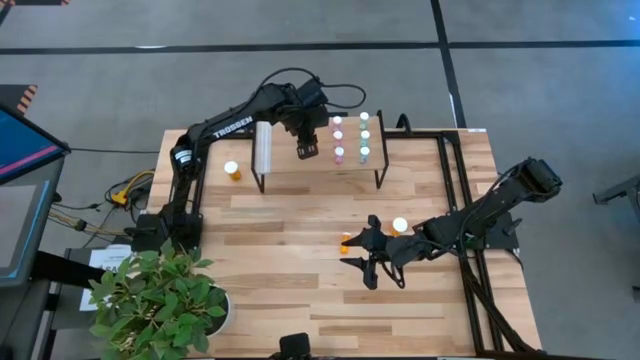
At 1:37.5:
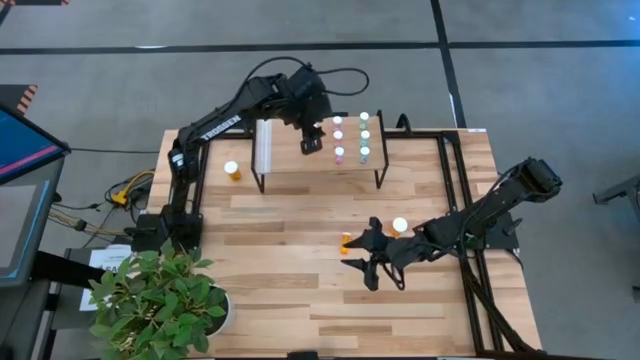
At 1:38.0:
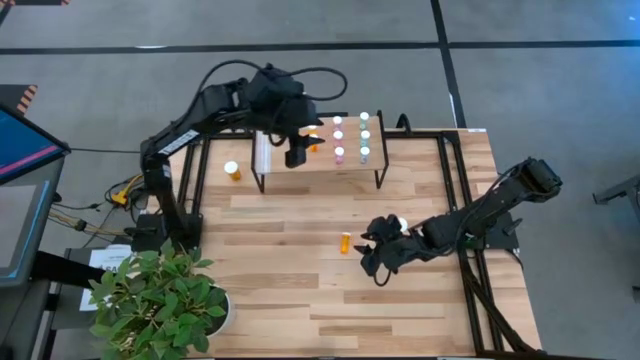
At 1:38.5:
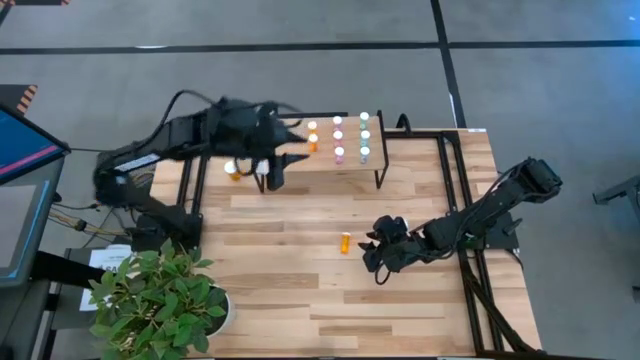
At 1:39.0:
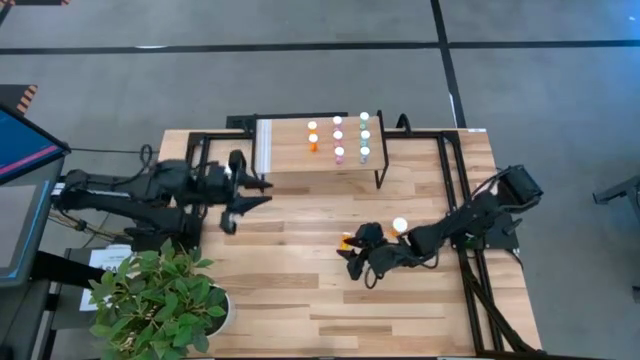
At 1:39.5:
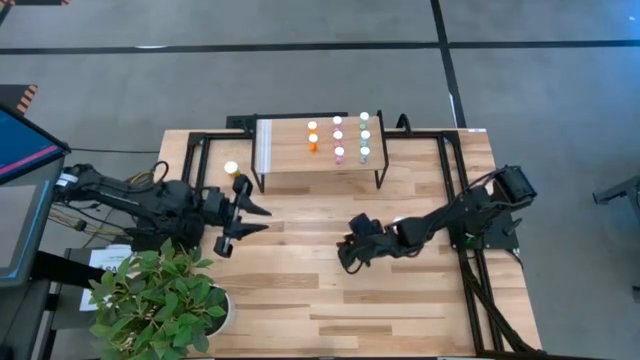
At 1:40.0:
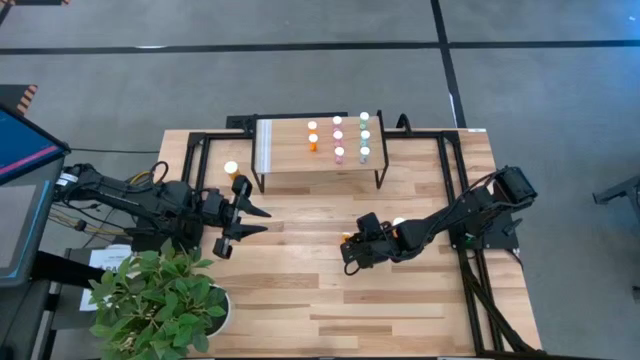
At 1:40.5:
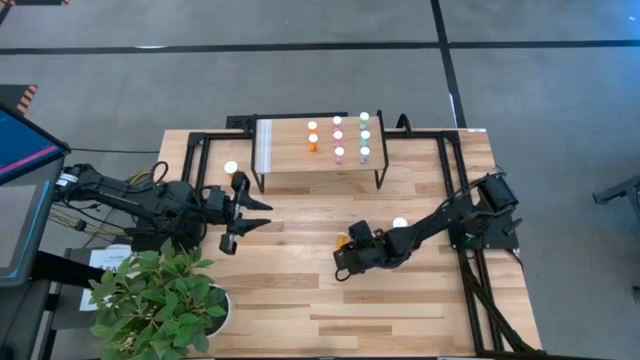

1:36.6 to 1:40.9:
Task: Pick and place medicine bottles onto shelf by color
Align the small orange pill bottle with the other small orange pill bottles on the shelf

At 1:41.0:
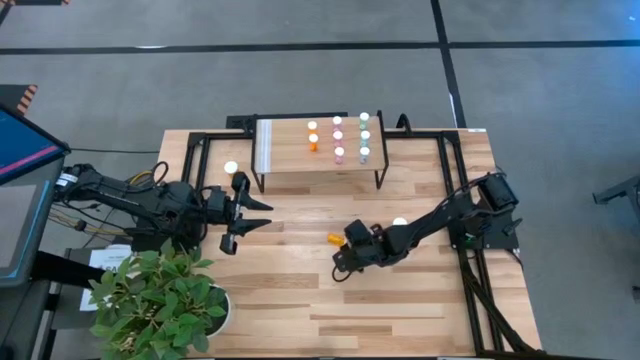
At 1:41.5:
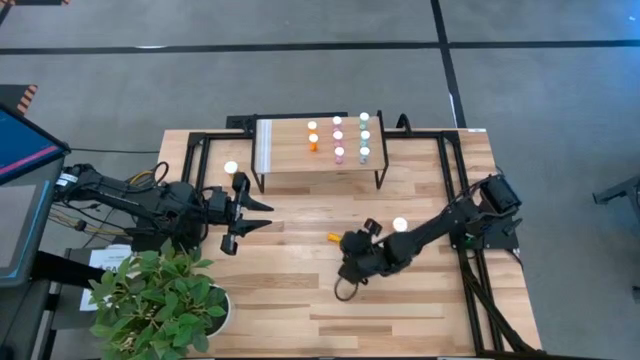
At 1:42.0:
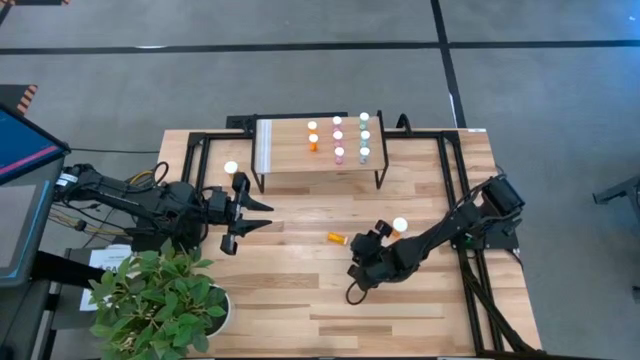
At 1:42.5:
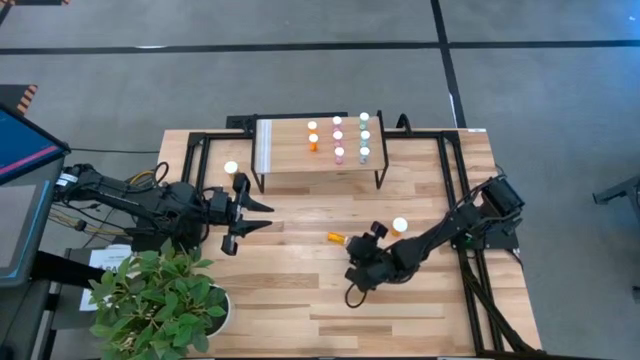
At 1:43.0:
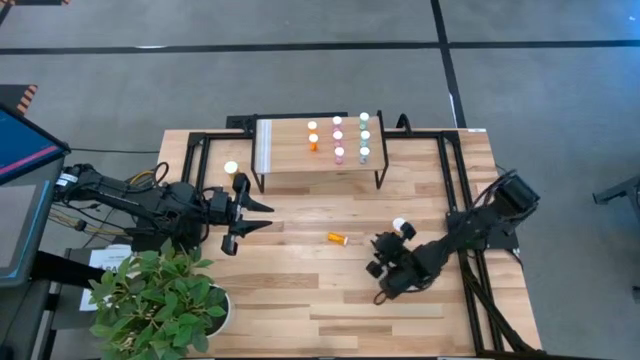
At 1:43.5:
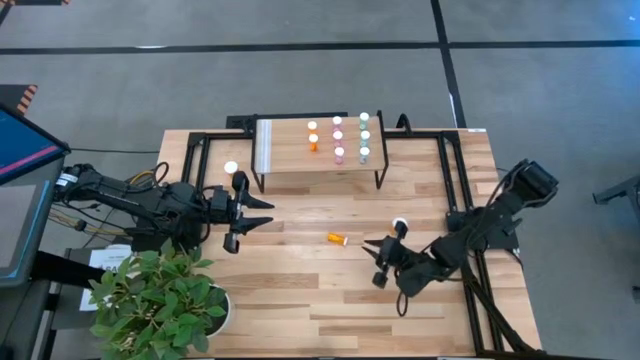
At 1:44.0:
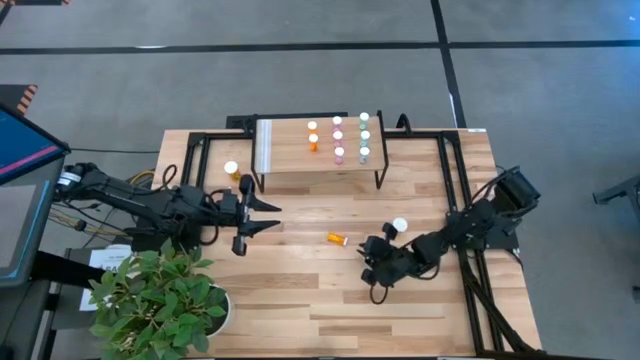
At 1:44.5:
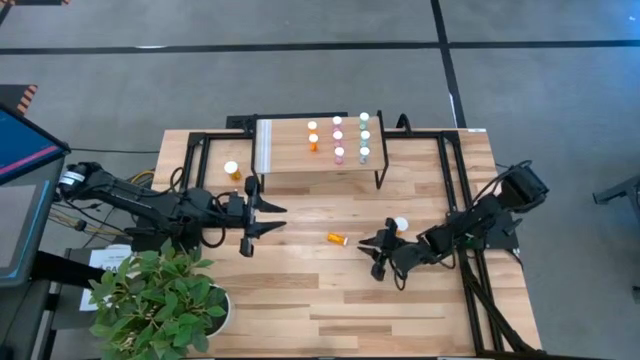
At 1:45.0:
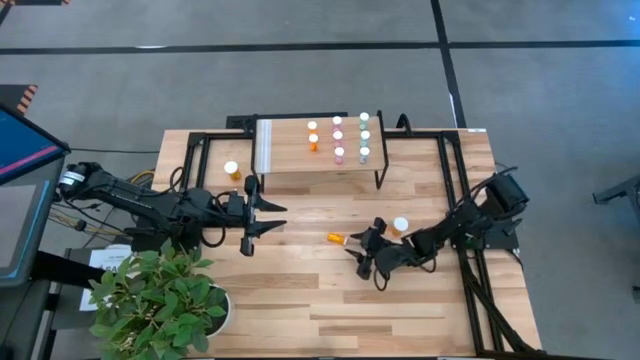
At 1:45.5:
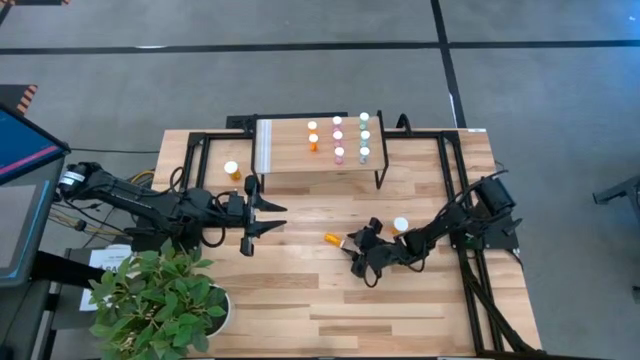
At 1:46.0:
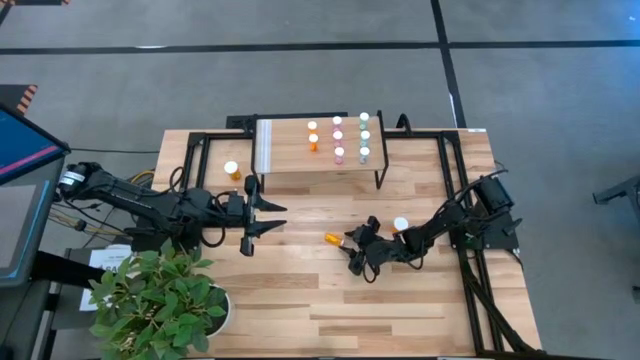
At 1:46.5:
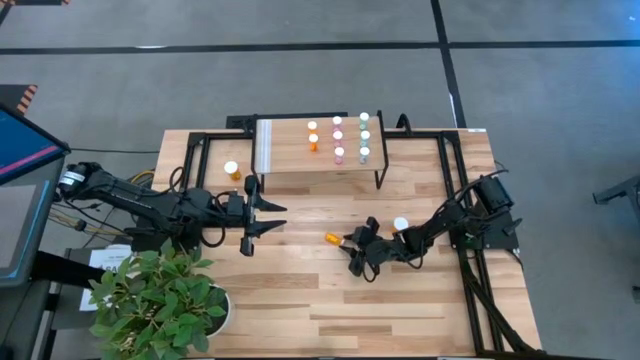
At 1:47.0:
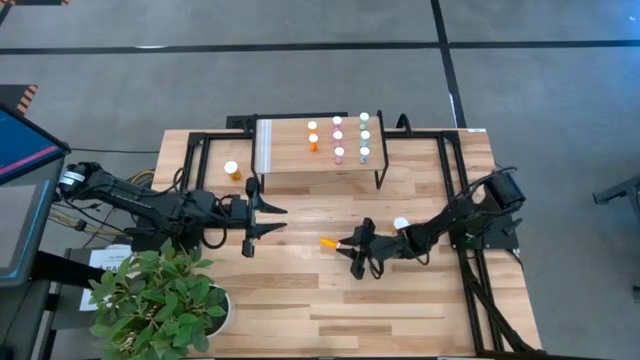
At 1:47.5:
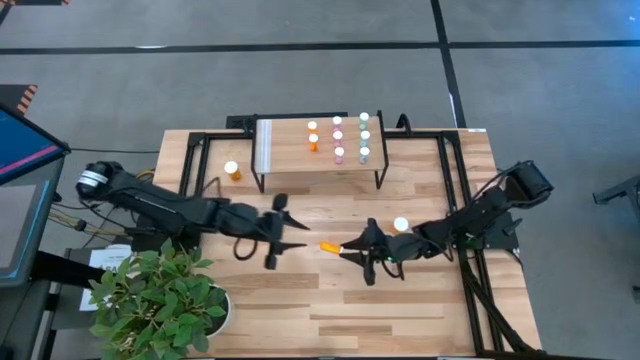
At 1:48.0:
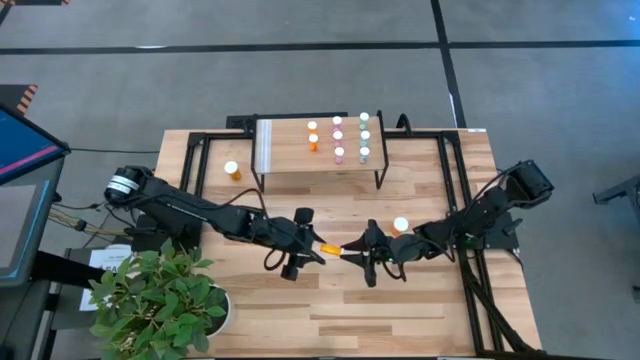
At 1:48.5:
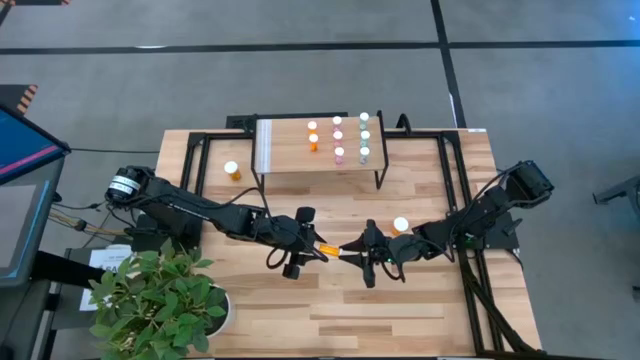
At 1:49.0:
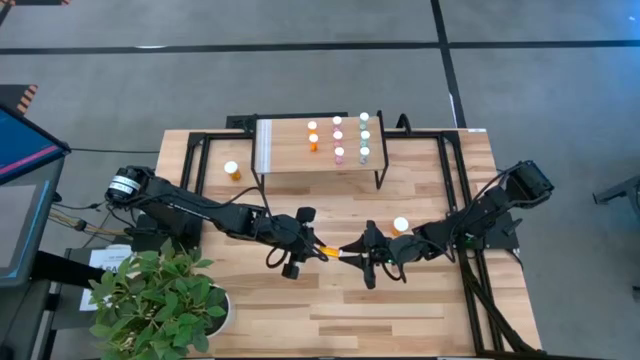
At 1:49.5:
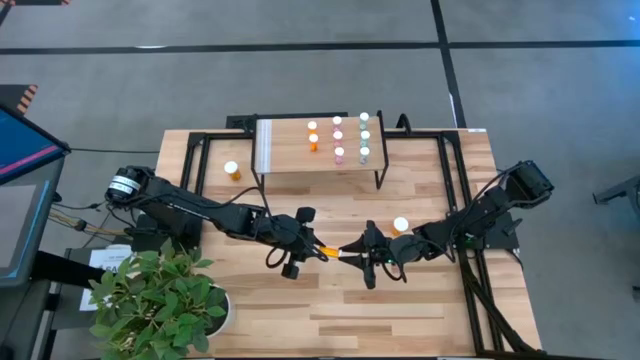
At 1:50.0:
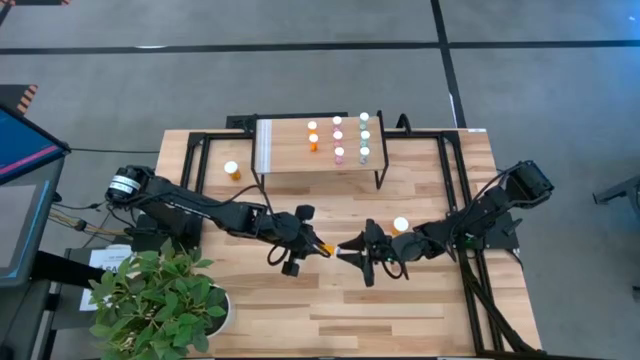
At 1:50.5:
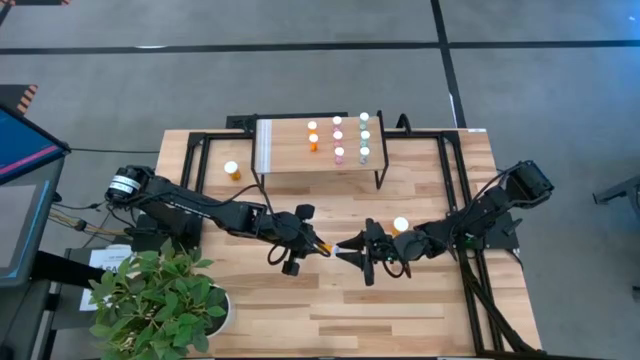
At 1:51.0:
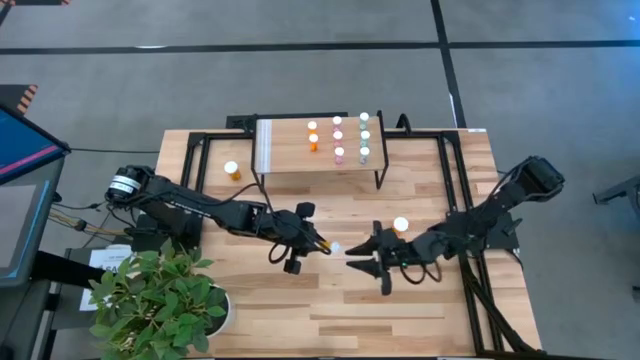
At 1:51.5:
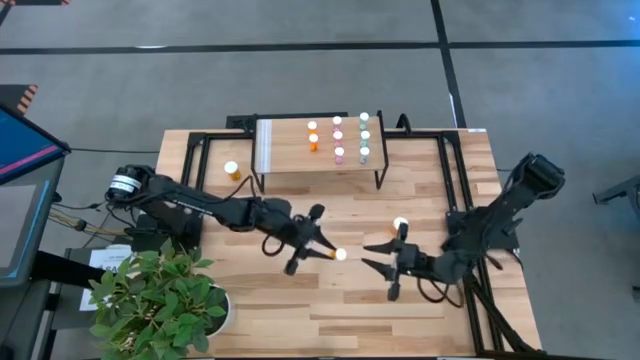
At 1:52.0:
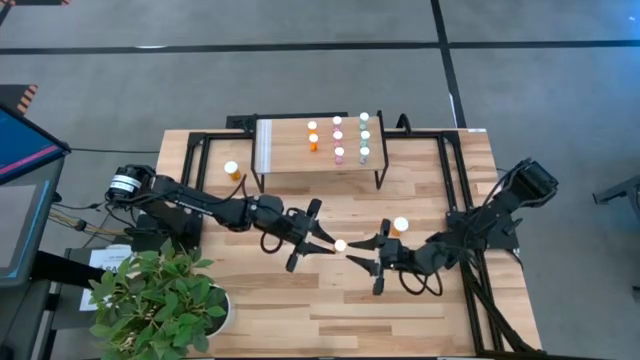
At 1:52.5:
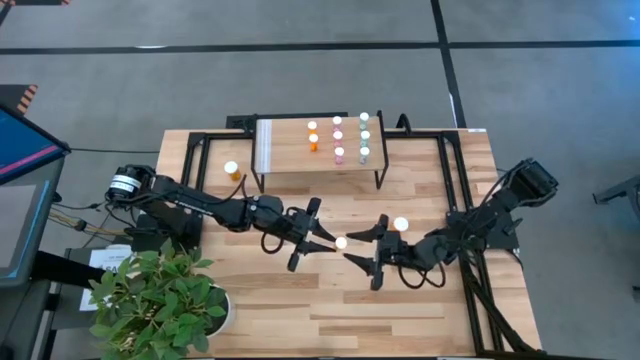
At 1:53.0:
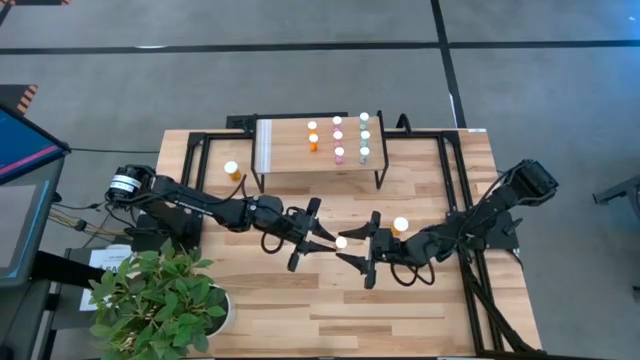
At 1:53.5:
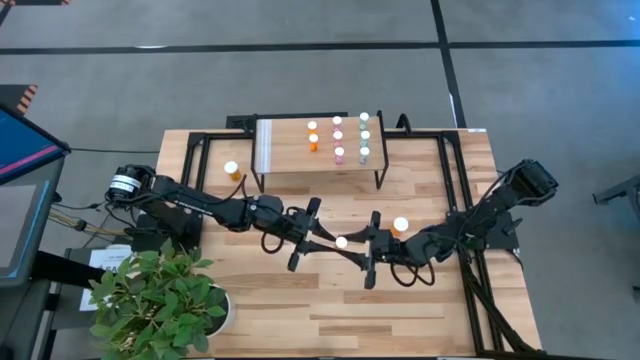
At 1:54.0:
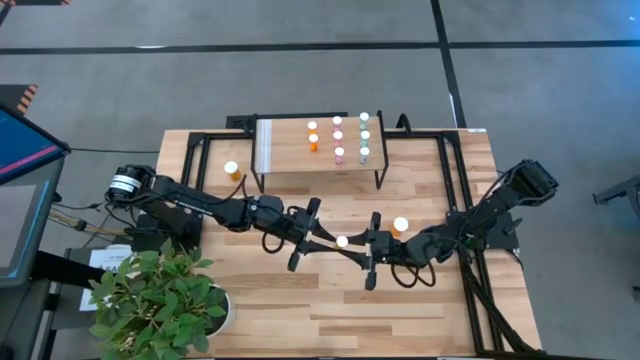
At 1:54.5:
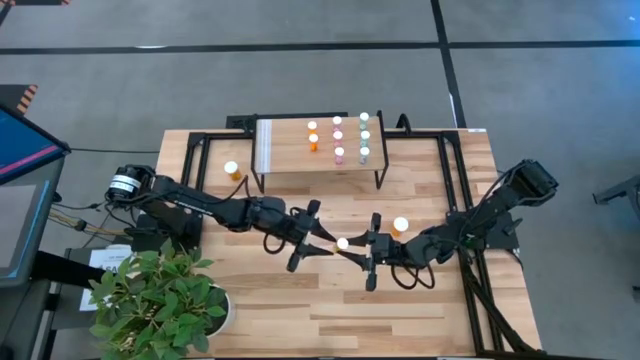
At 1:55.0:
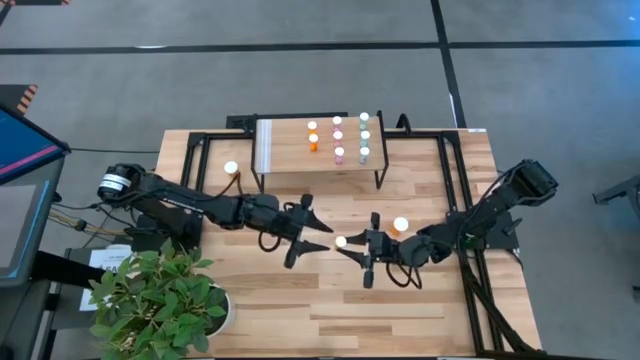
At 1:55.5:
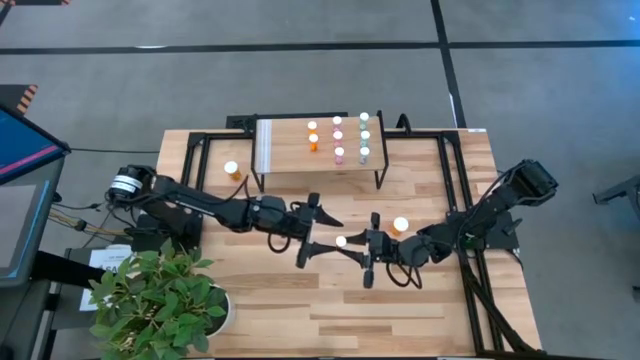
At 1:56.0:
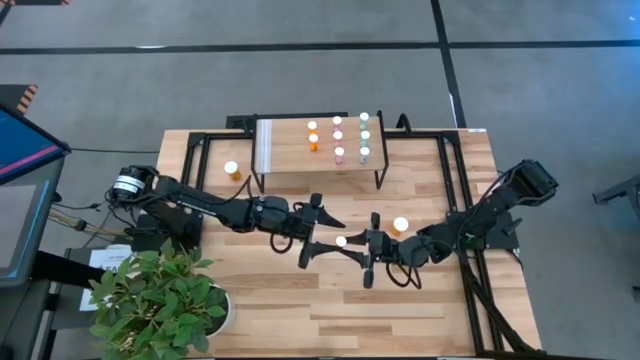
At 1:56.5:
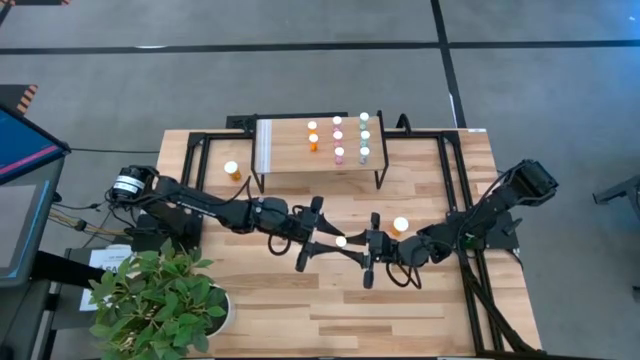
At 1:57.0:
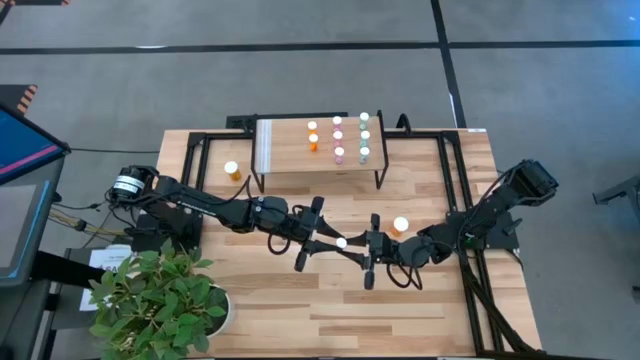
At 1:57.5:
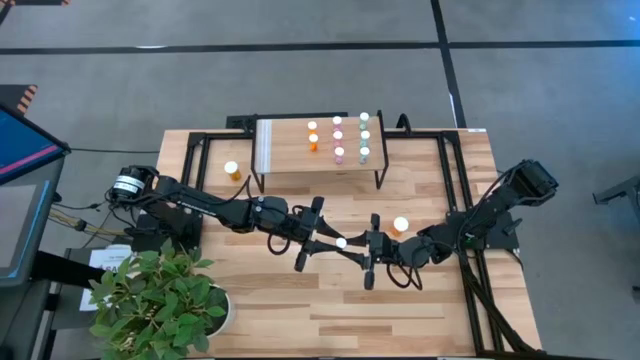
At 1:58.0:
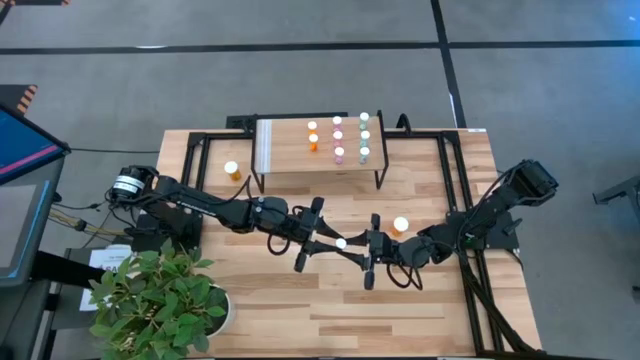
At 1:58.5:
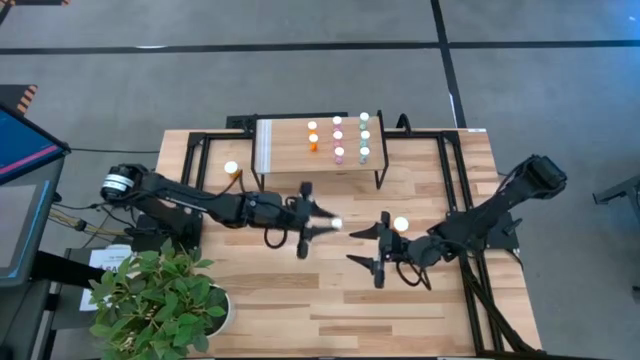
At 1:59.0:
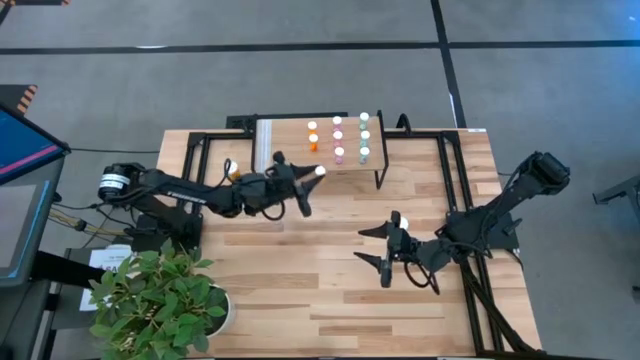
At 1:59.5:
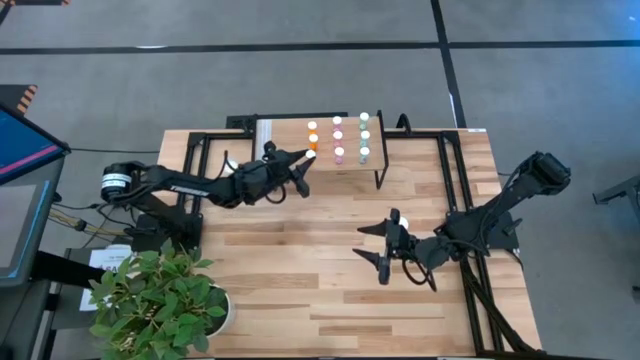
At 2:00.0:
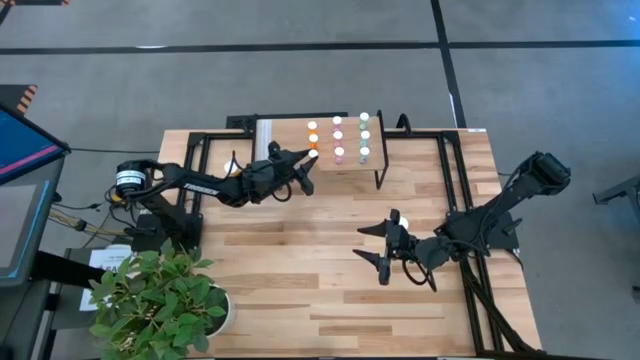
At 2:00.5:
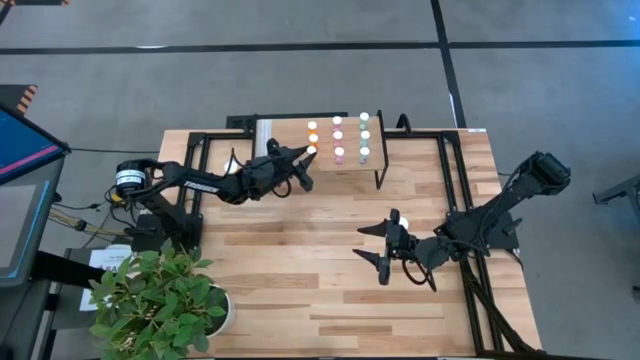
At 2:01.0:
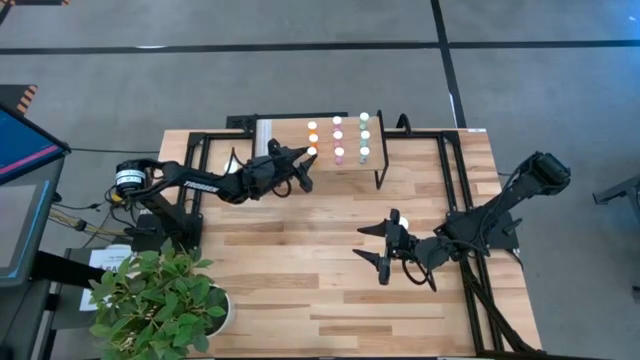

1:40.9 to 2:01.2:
Align the small orange pill bottle with the other small orange pill bottles on the shelf
